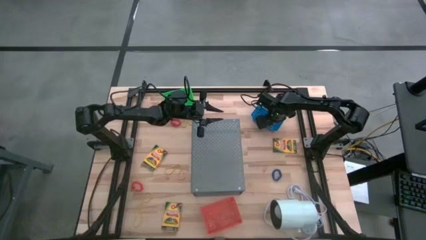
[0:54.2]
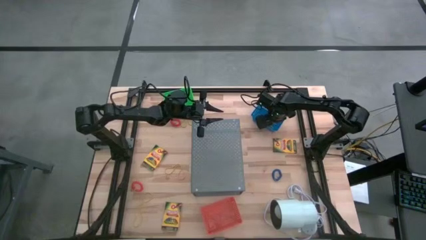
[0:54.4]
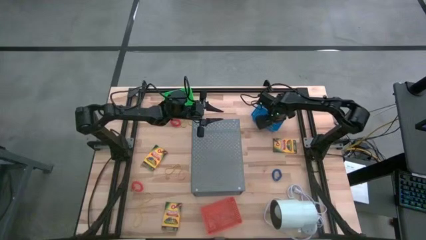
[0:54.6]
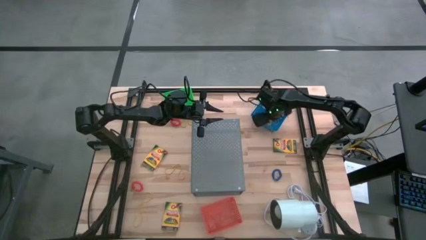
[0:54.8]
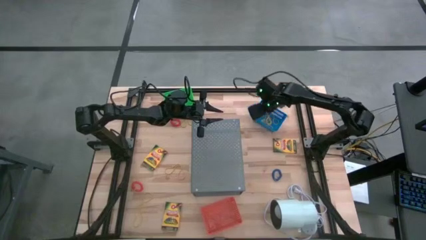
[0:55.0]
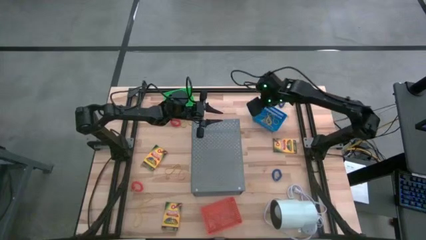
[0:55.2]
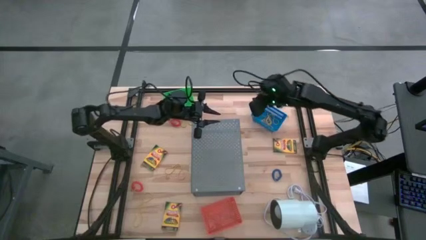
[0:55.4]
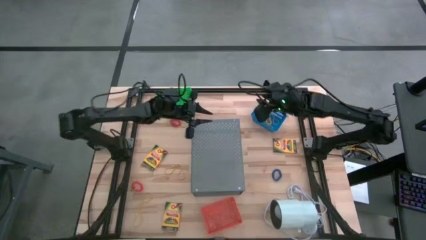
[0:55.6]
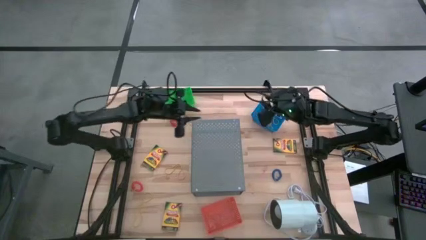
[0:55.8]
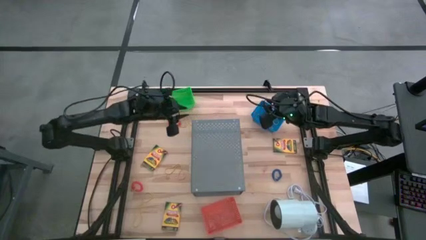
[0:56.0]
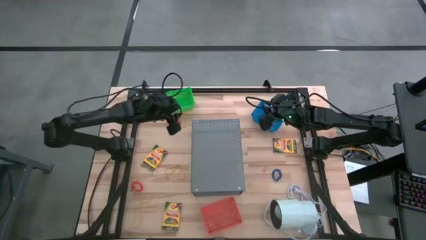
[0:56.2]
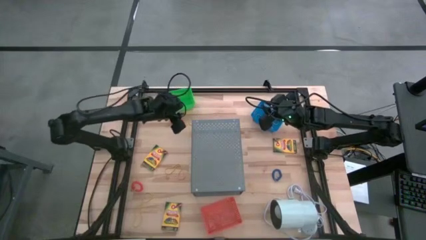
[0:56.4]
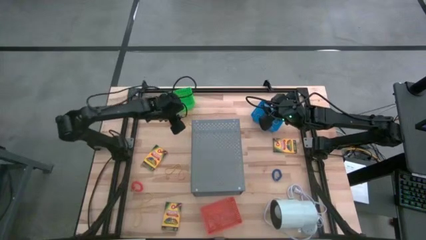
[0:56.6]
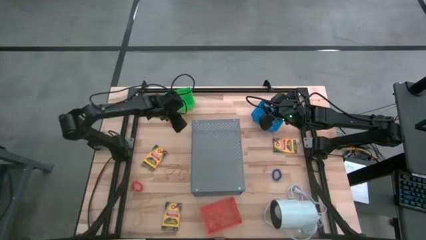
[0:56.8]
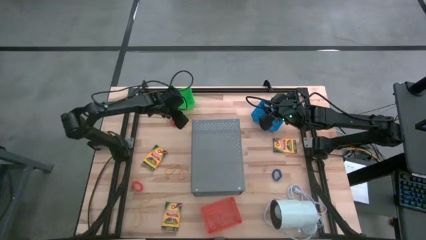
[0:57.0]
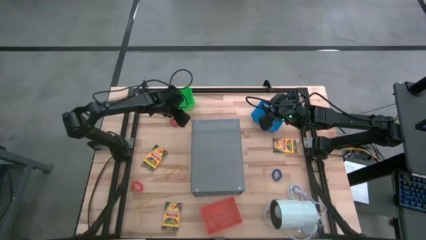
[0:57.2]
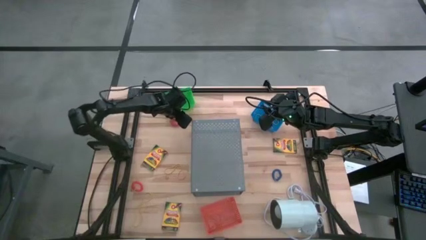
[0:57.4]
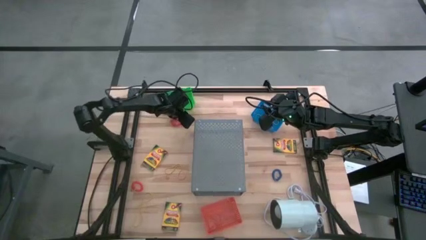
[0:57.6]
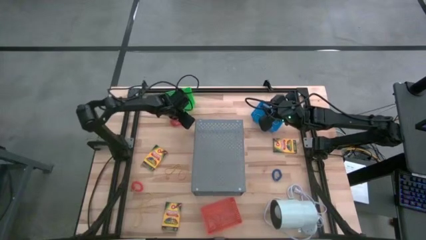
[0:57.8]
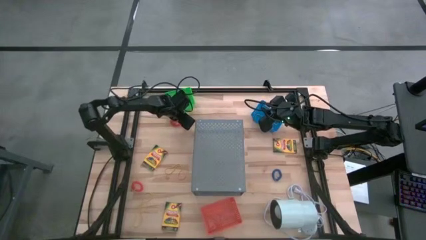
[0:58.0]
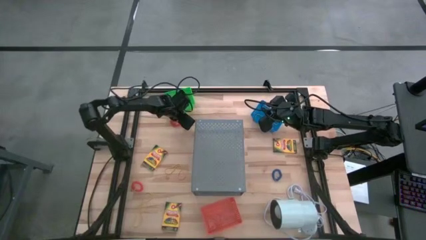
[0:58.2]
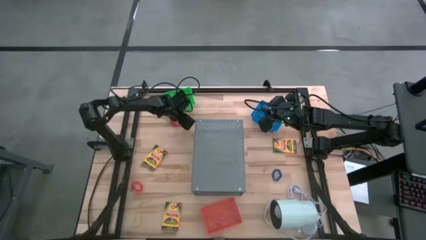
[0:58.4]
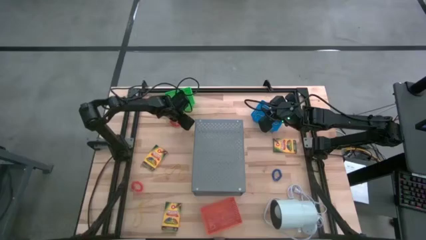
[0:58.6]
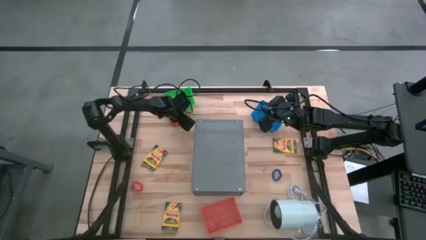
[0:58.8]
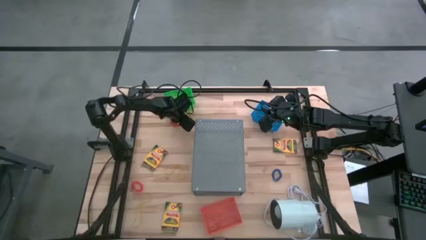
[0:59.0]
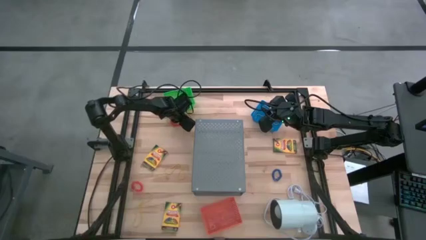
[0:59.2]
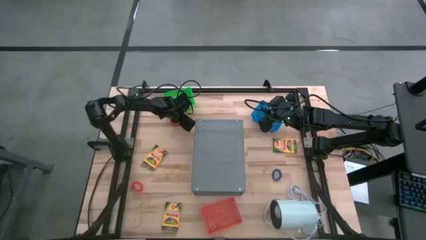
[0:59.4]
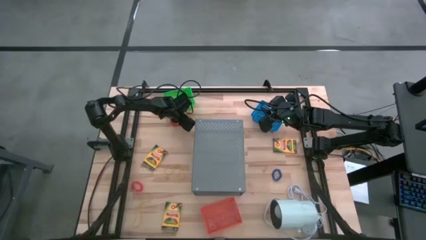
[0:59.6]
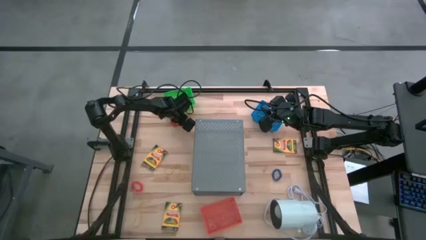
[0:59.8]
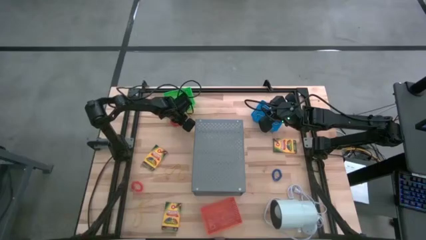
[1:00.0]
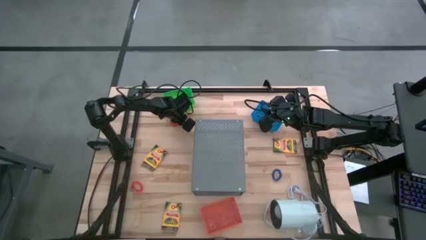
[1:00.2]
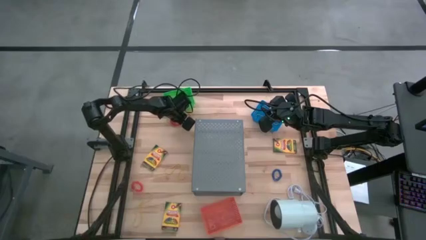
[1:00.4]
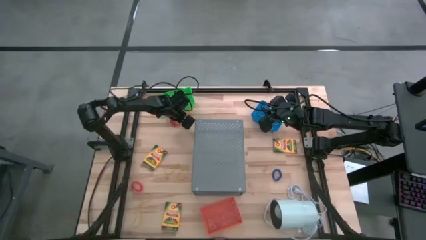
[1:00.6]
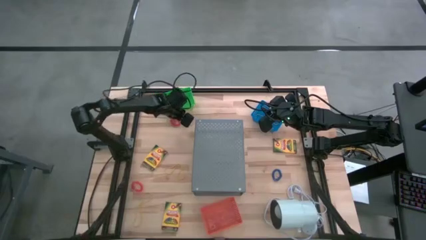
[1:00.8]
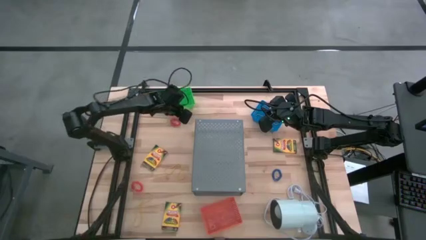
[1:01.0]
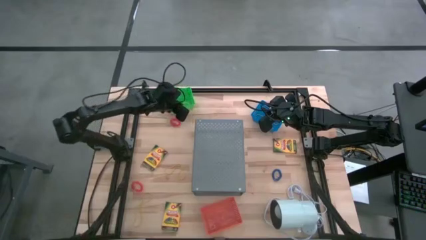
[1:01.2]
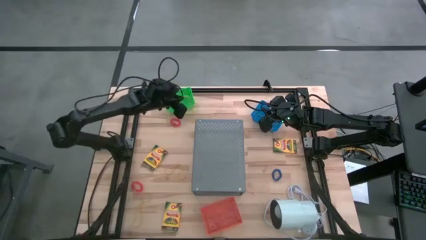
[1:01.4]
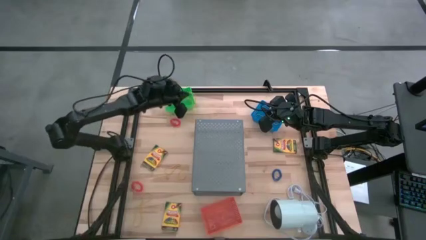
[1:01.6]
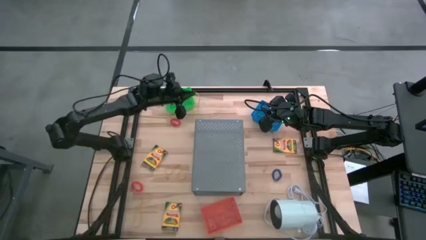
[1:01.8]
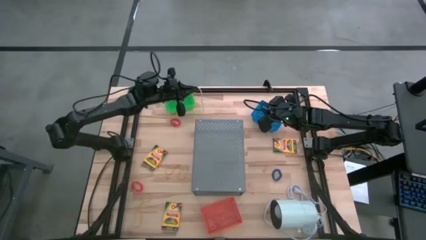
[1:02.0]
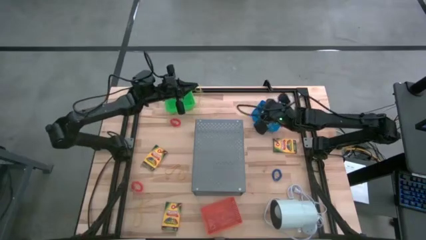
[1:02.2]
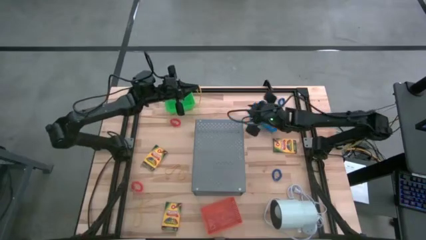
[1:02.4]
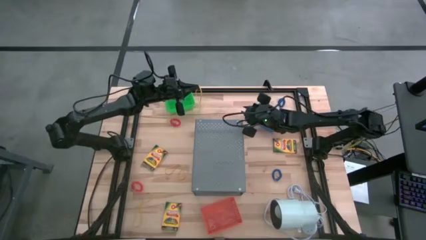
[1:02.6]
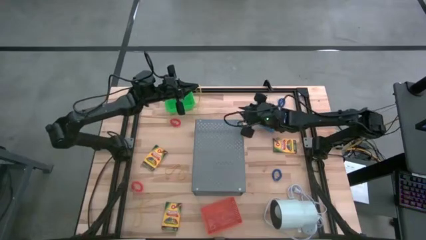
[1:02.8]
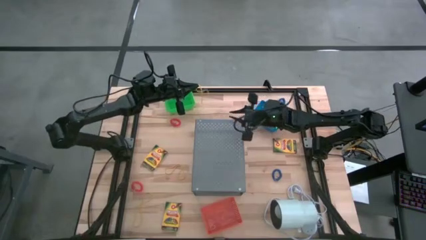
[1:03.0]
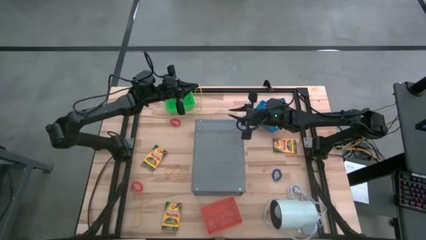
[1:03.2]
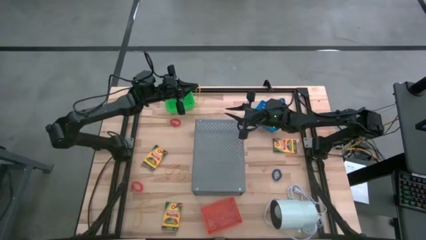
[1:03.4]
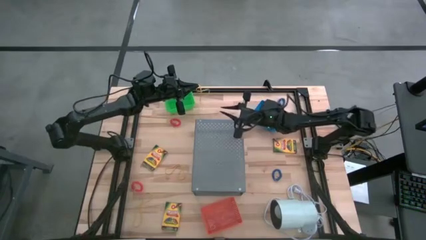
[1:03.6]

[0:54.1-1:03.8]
Task: Pick & Place Office Desk Supplies
Put the top yellow rubber band into the blue basket

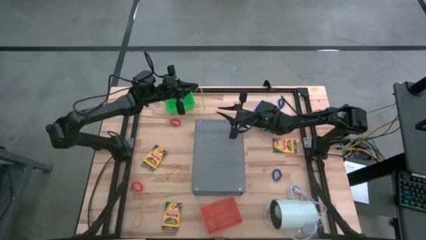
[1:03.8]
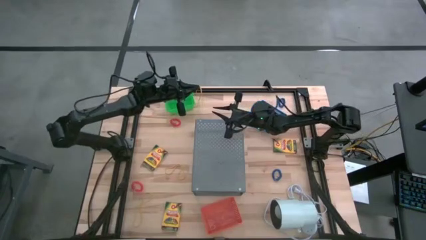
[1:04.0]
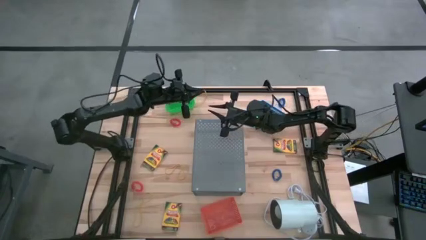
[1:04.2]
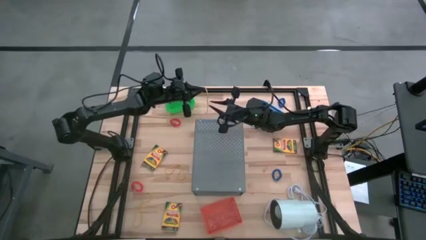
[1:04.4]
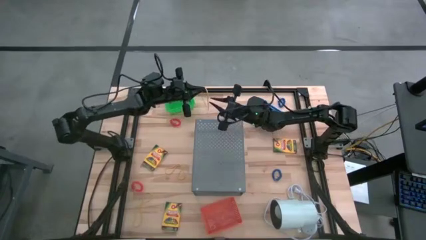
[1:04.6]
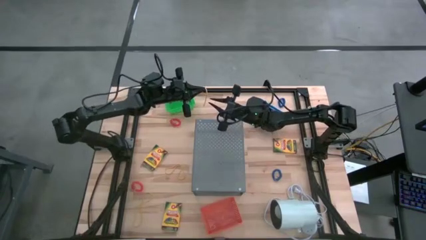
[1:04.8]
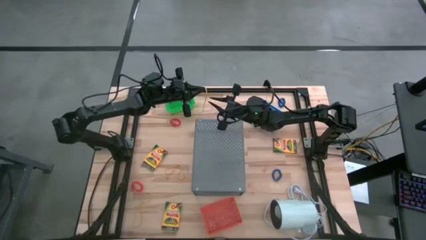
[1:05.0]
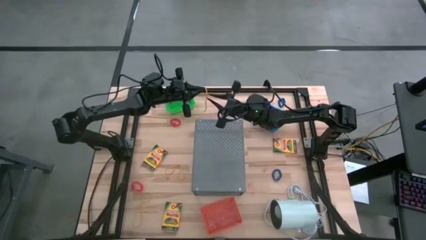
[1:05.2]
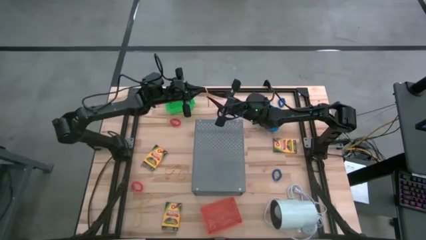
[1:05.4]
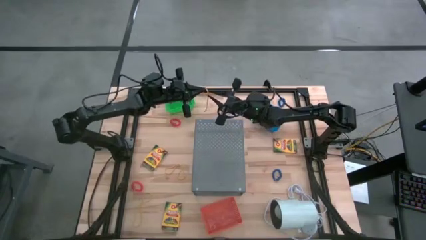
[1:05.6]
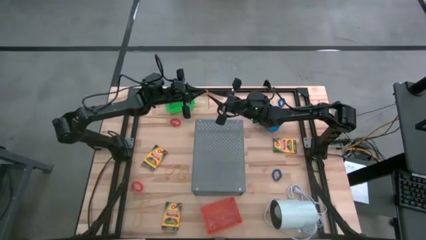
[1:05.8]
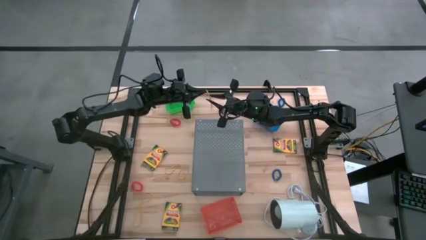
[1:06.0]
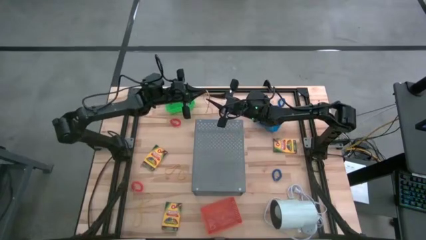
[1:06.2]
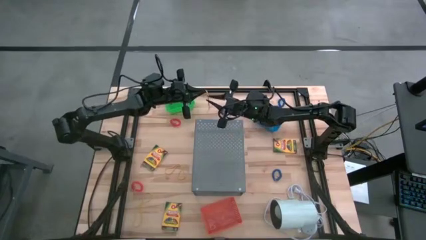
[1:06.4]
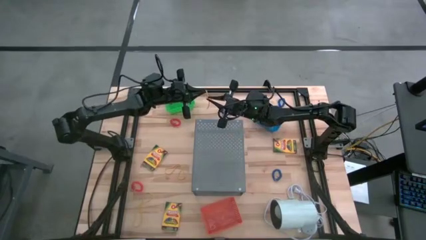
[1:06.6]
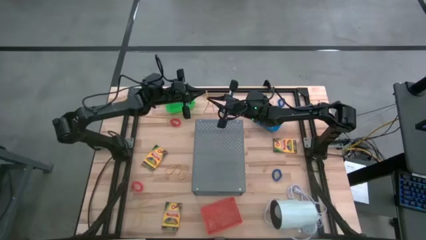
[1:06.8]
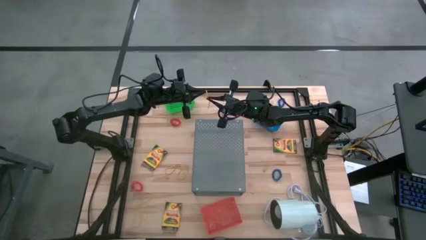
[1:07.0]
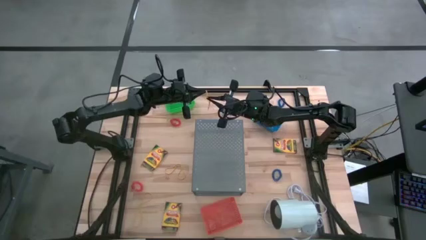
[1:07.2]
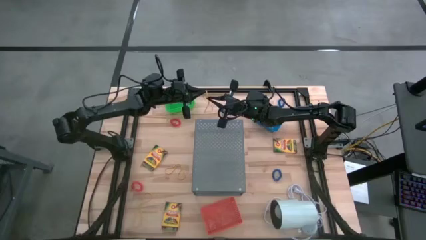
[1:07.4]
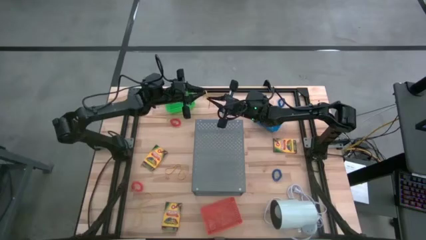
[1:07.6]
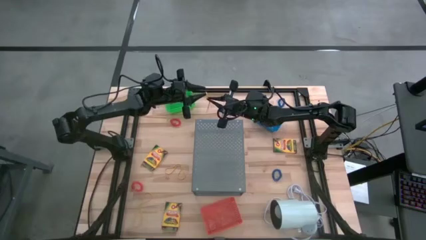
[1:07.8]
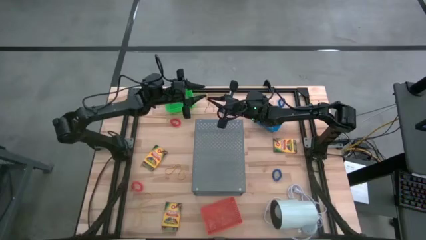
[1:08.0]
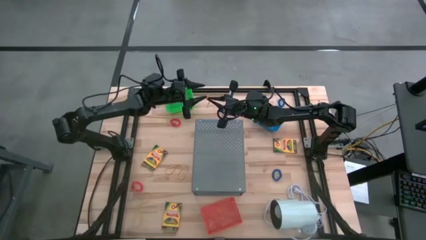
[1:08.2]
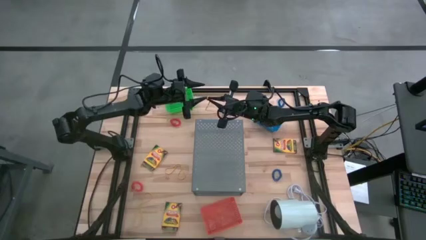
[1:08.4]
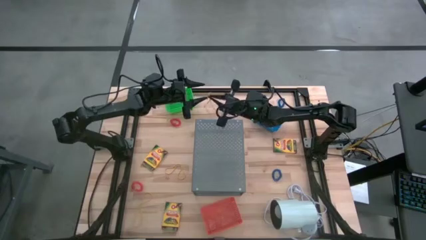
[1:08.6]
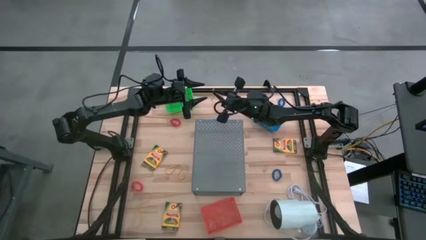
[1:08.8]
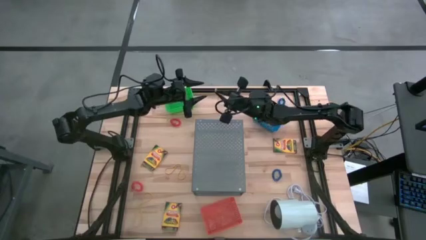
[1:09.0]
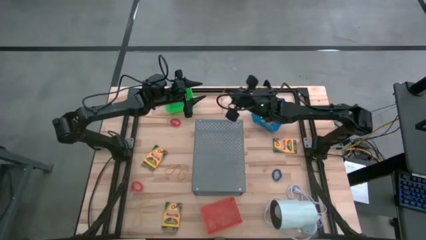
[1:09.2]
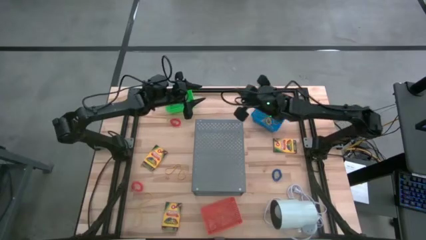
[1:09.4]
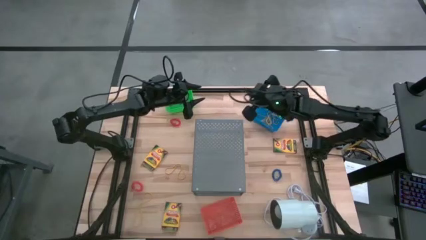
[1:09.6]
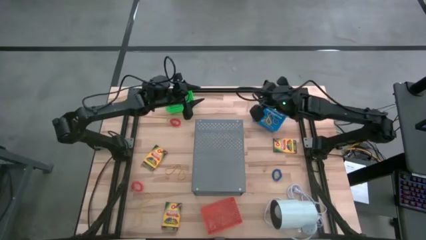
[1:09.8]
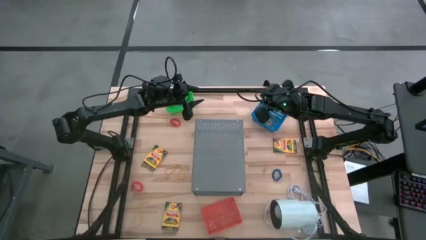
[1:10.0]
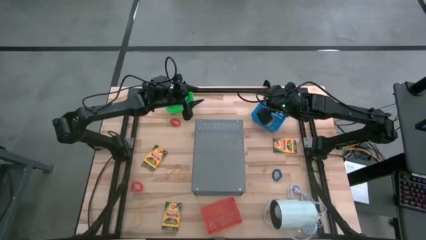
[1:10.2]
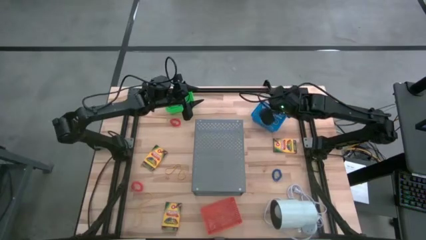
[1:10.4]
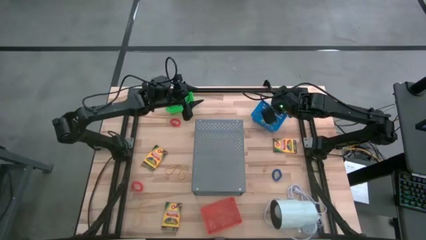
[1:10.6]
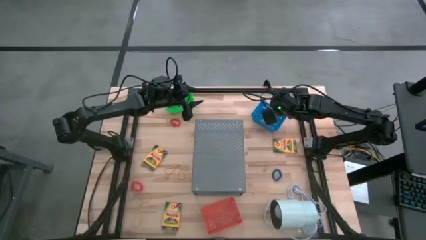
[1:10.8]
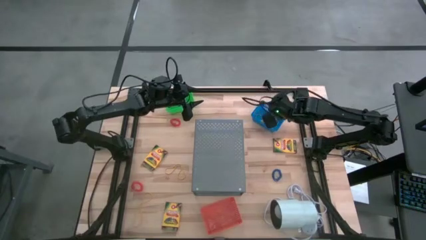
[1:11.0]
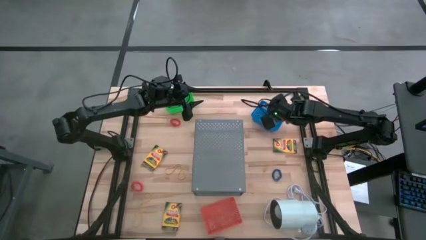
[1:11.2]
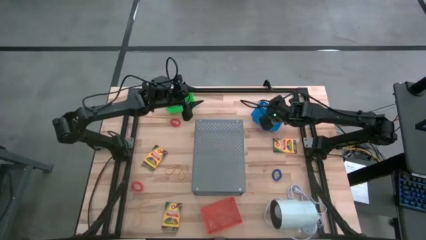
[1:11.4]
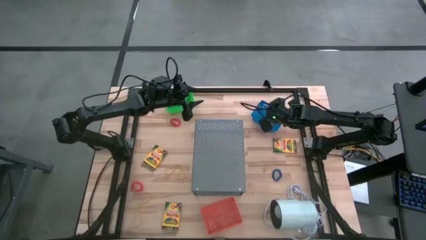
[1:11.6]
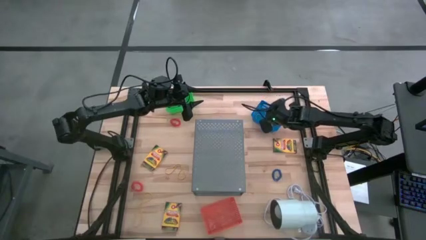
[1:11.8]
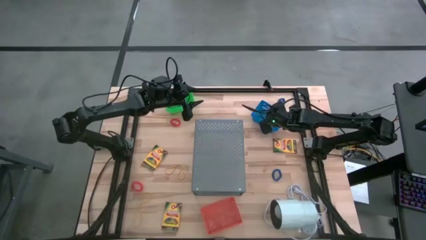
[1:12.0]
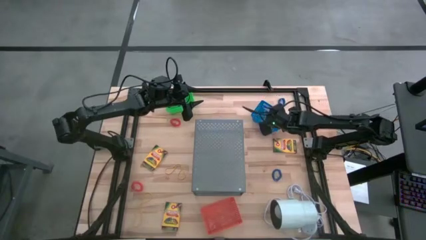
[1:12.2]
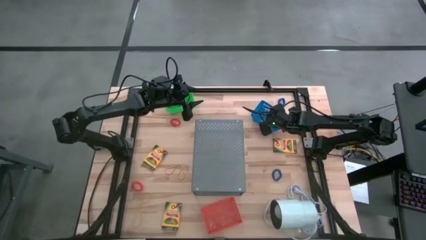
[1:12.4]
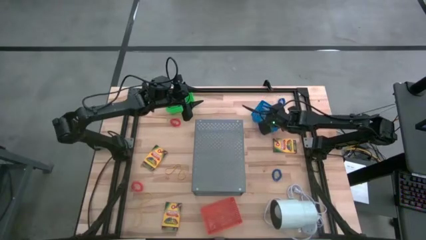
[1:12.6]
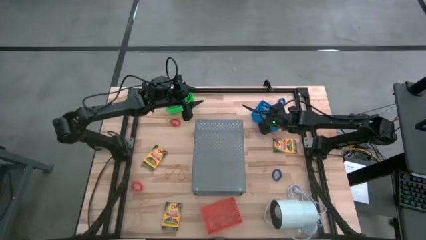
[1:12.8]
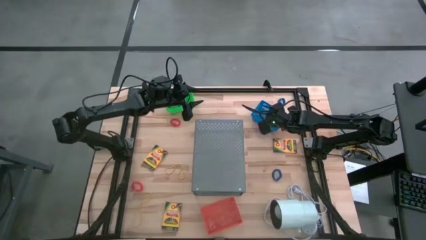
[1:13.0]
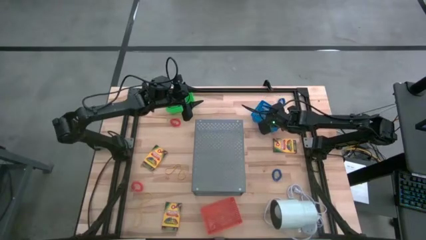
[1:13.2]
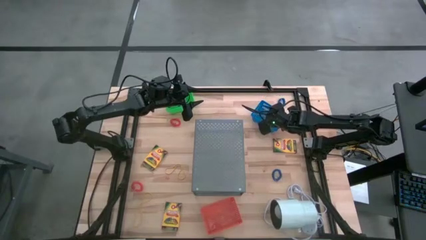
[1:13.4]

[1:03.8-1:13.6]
Put the top yellow rubber band into the blue basket
